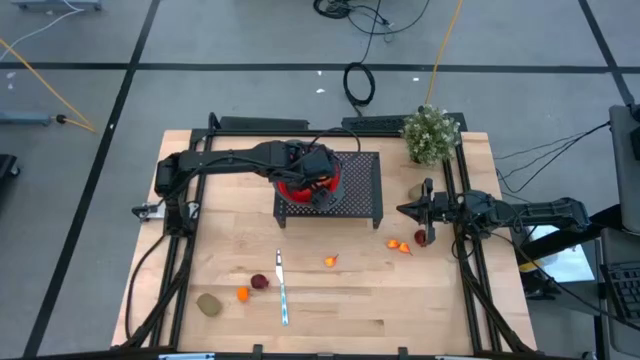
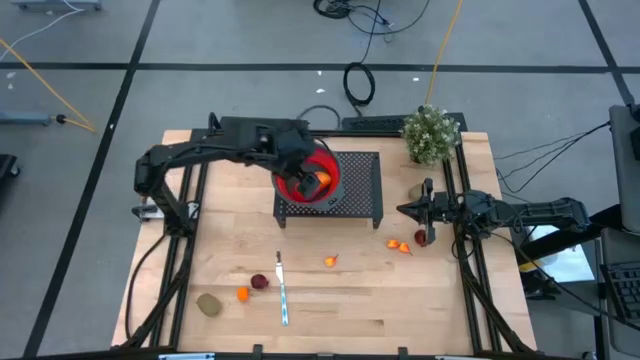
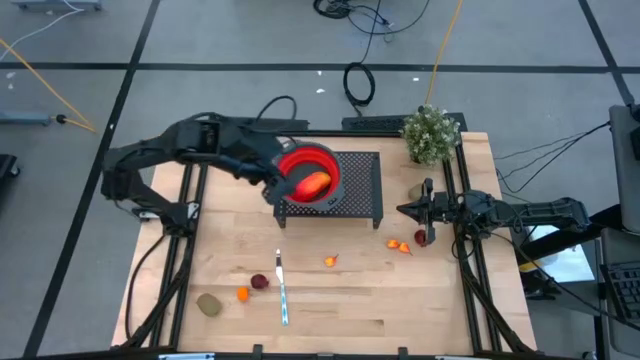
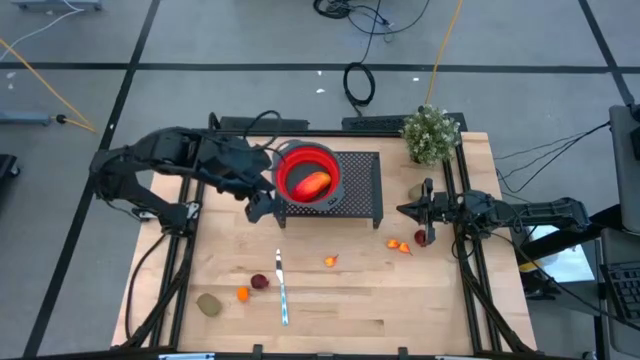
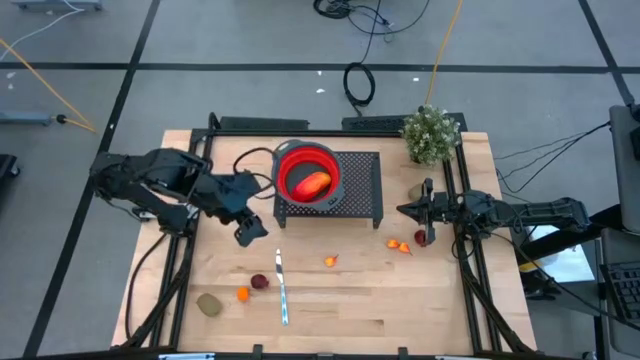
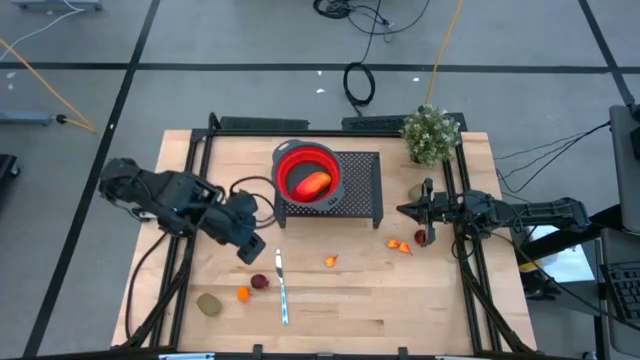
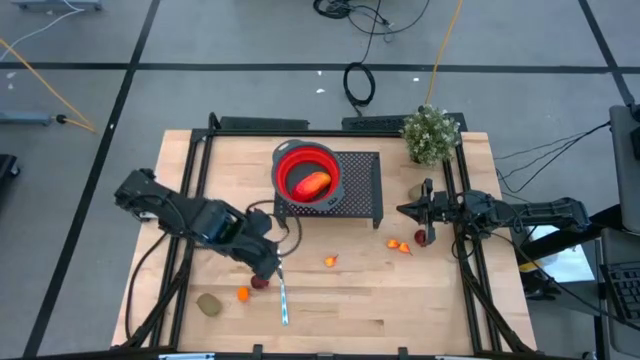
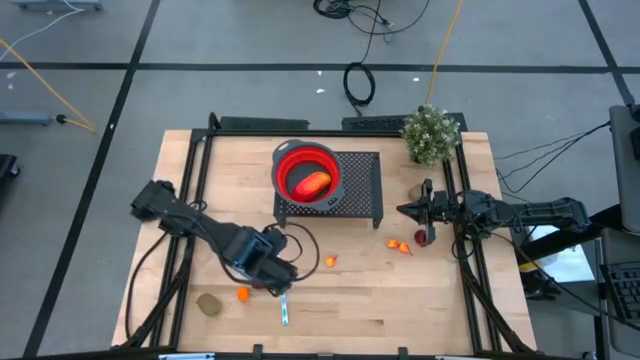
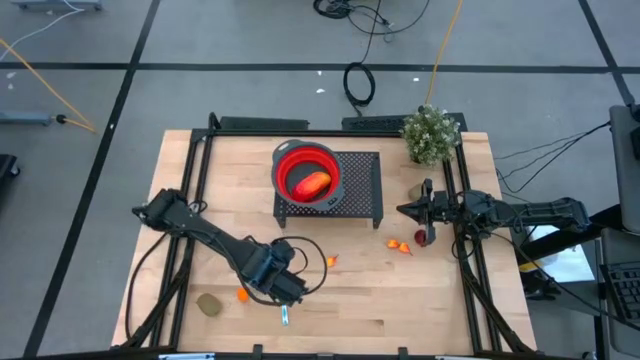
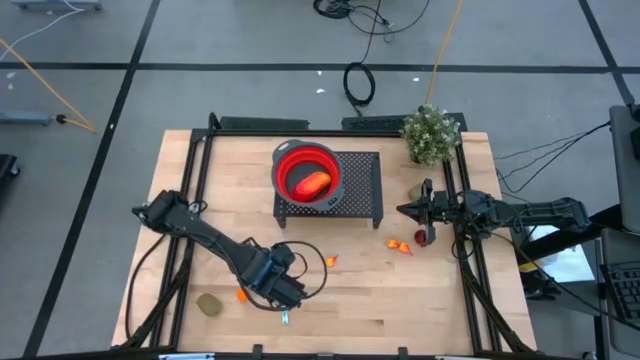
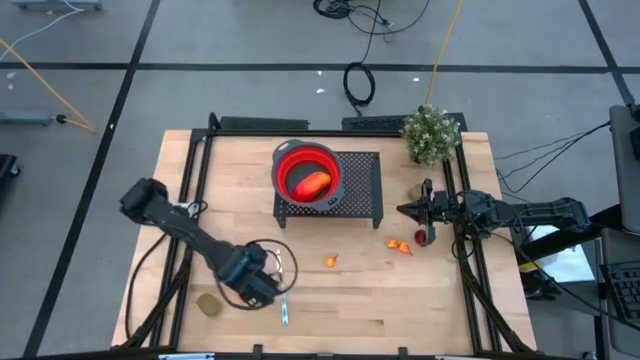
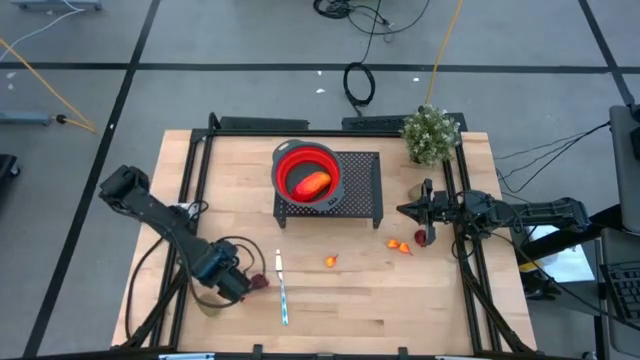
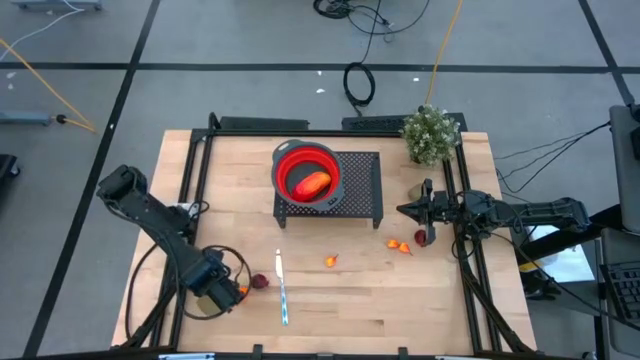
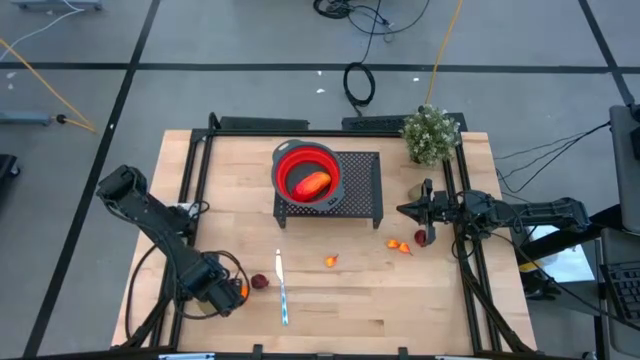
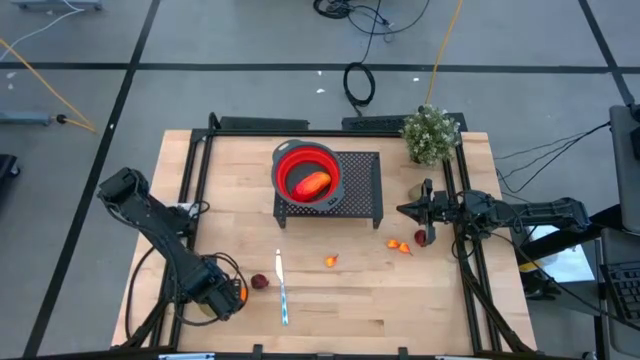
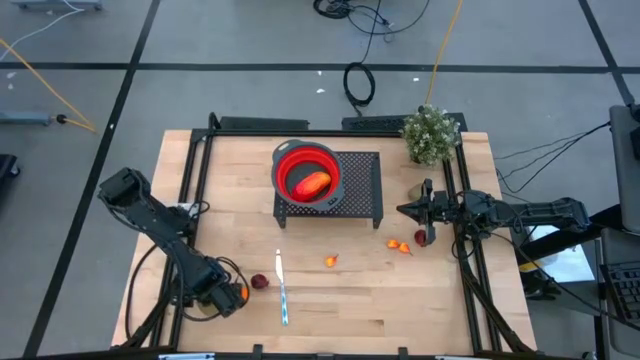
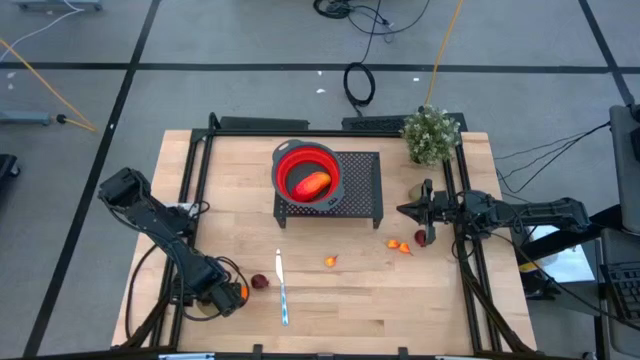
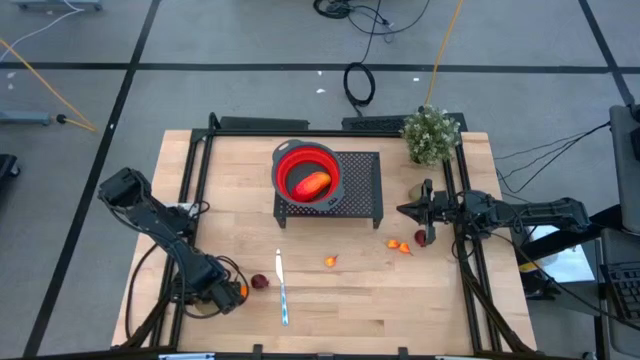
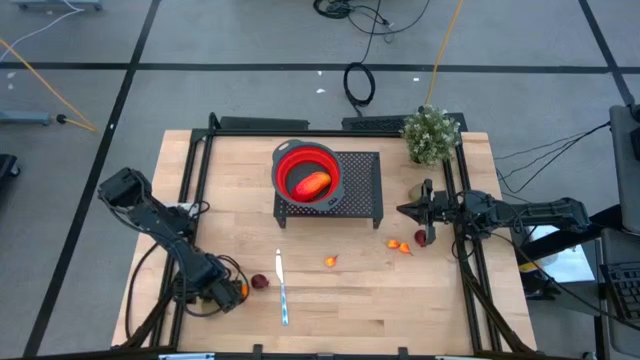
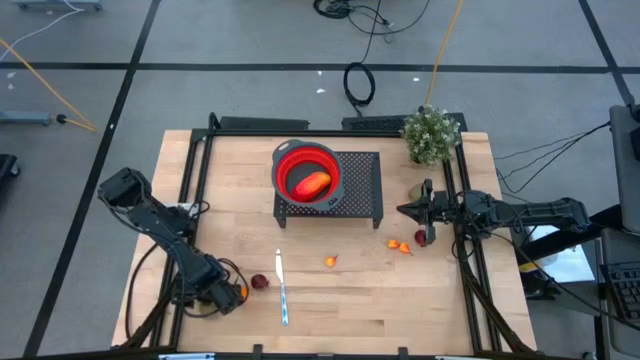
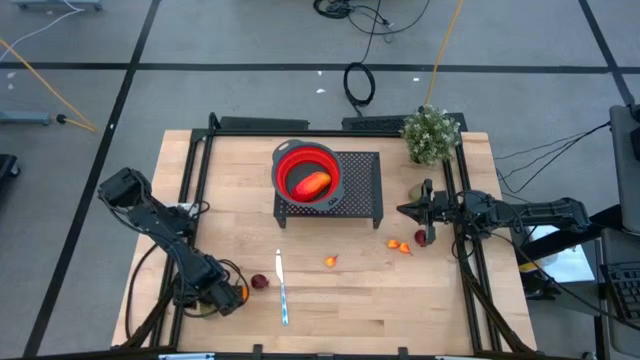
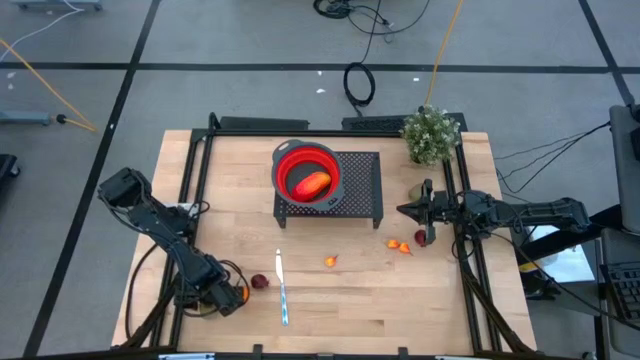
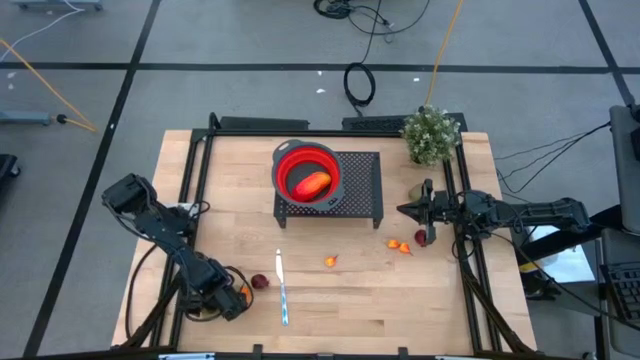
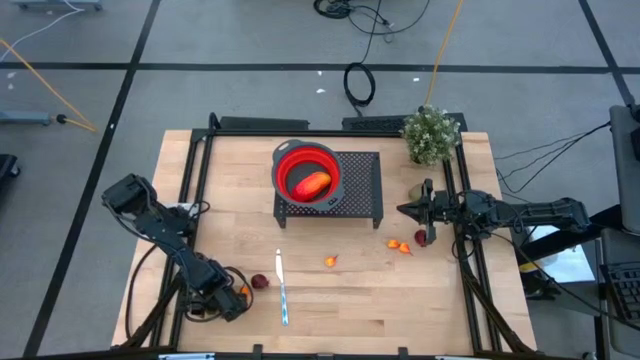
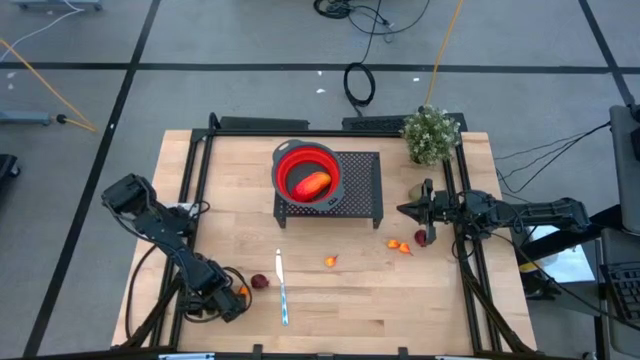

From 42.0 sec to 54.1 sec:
Task: Pick & Place Fruit
Put the bottom left kiwi into the strainer on the shelf

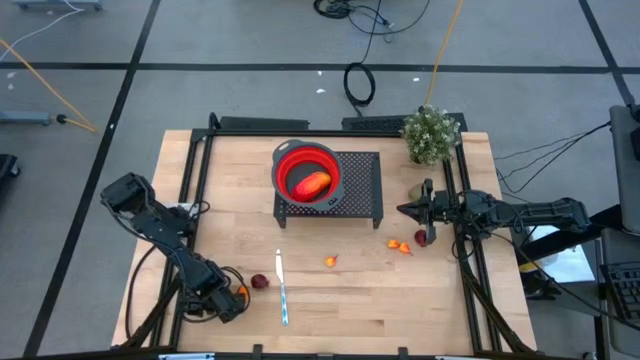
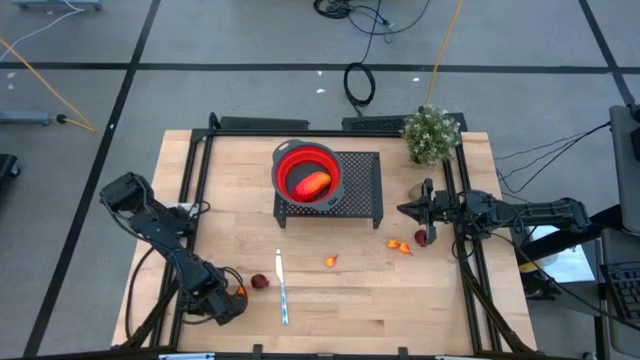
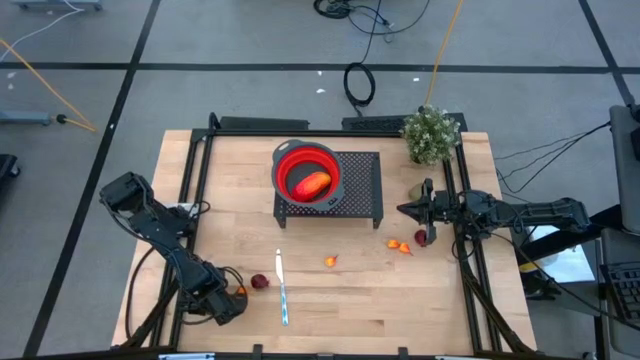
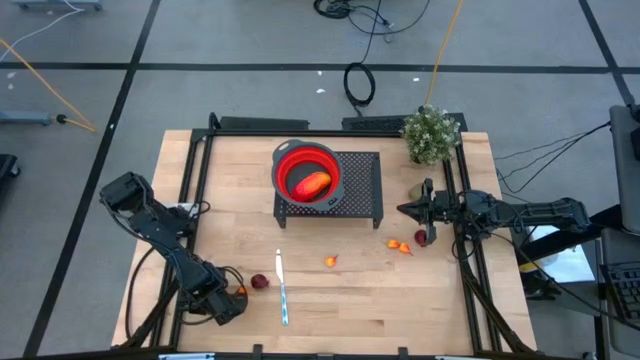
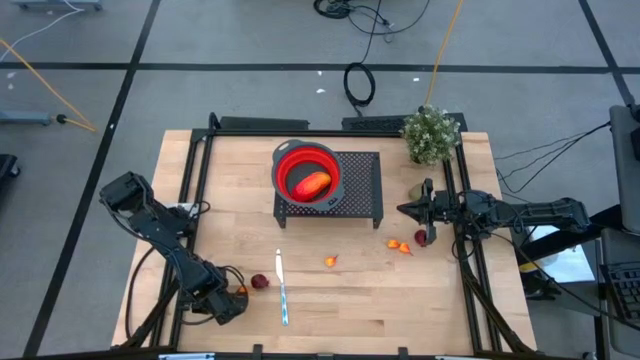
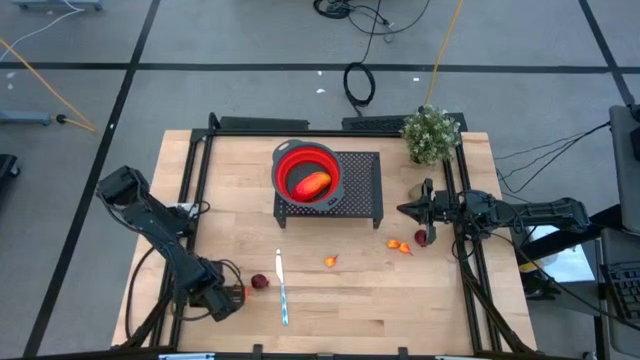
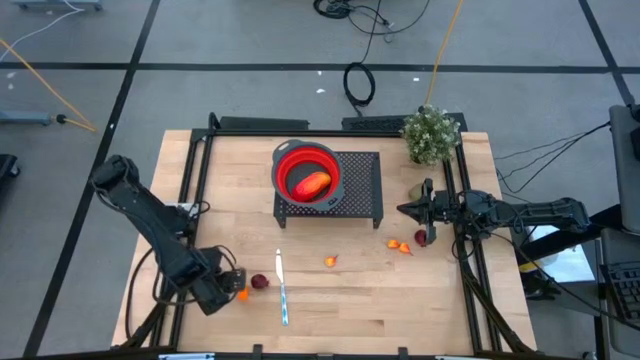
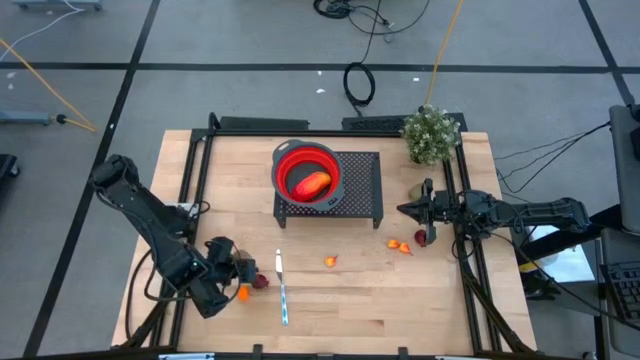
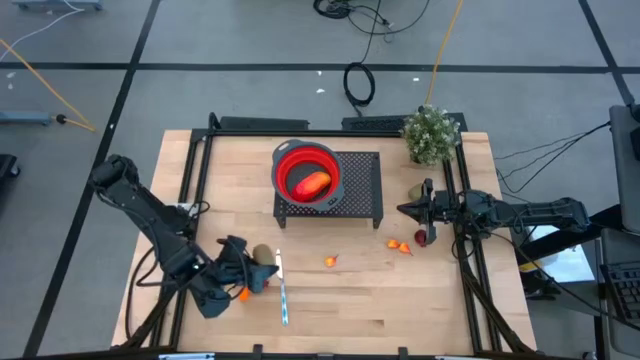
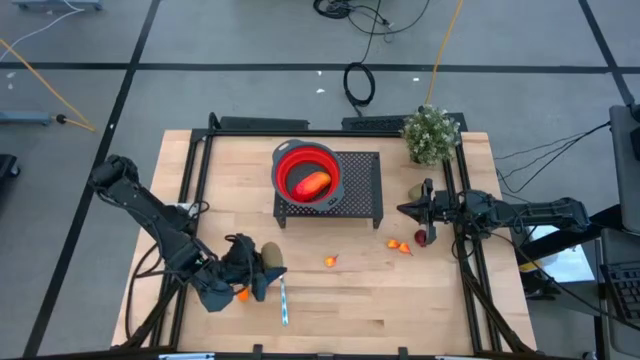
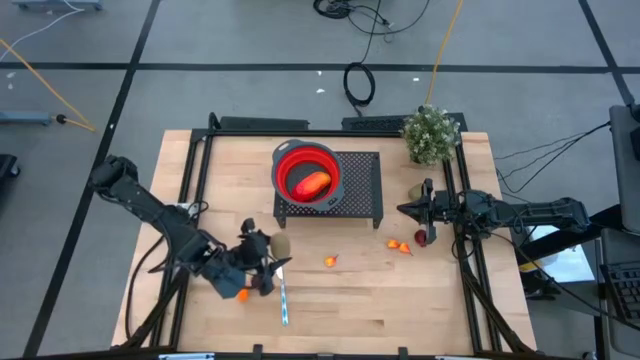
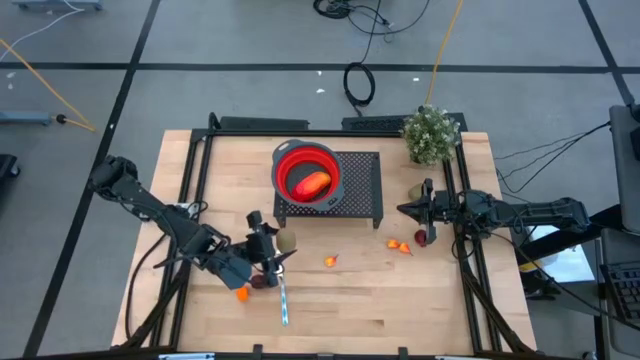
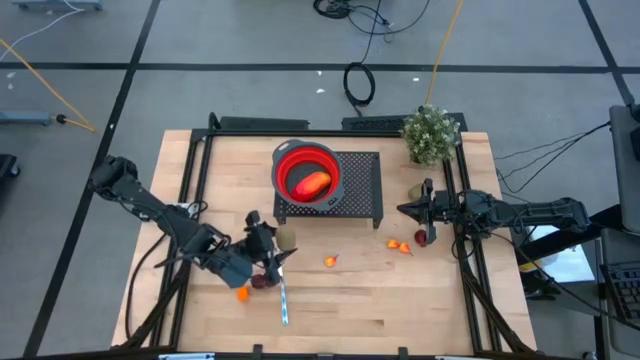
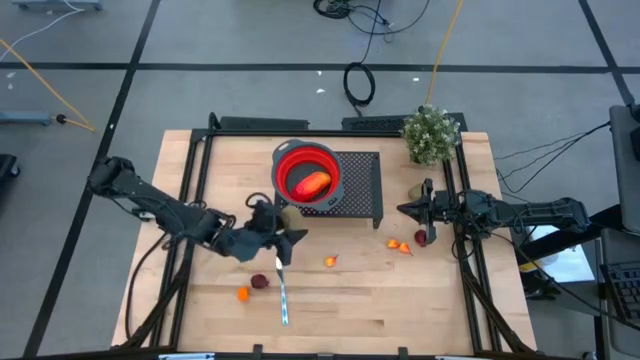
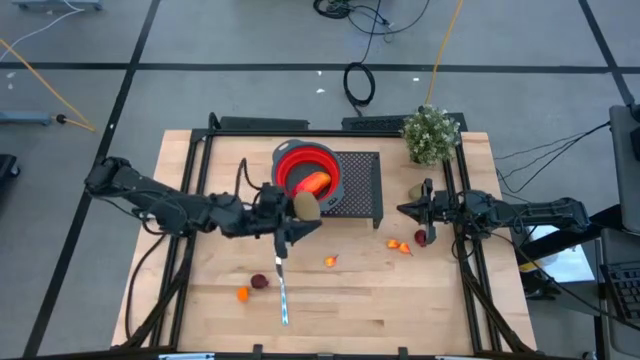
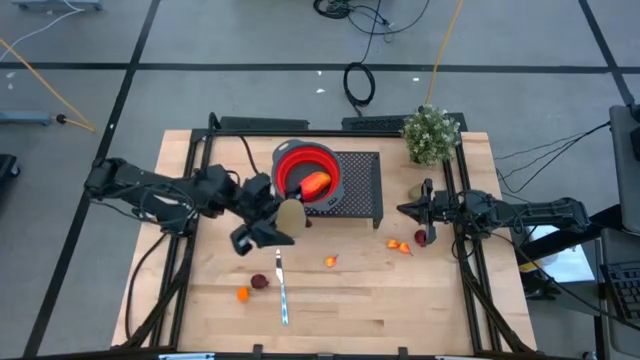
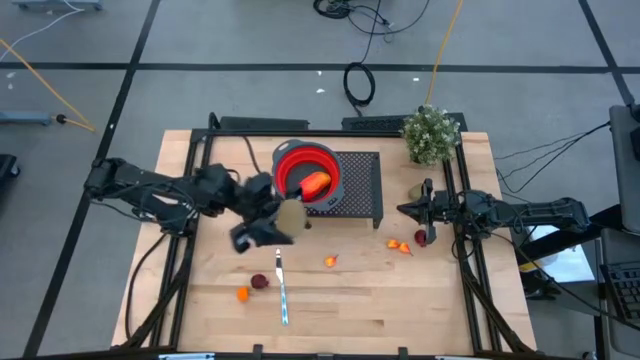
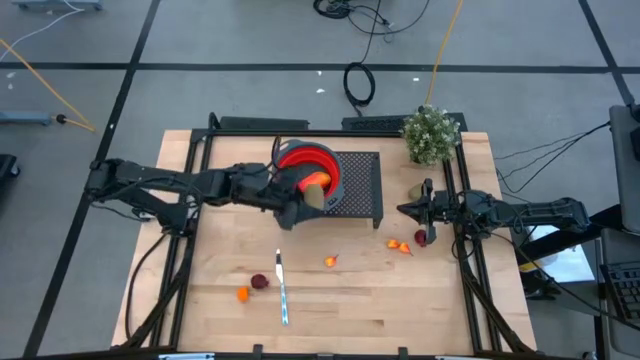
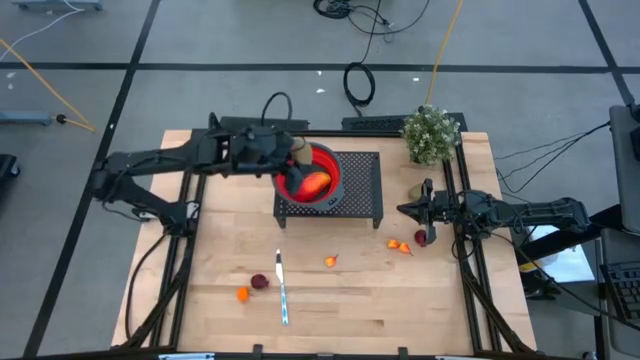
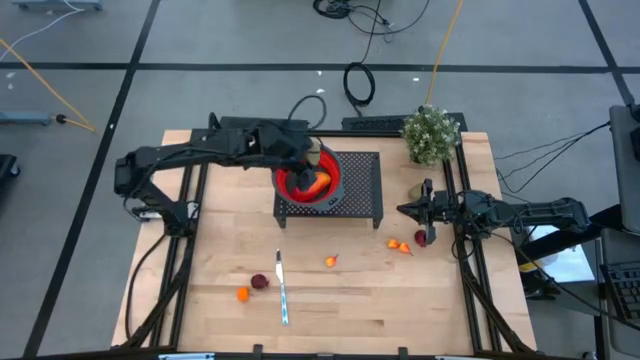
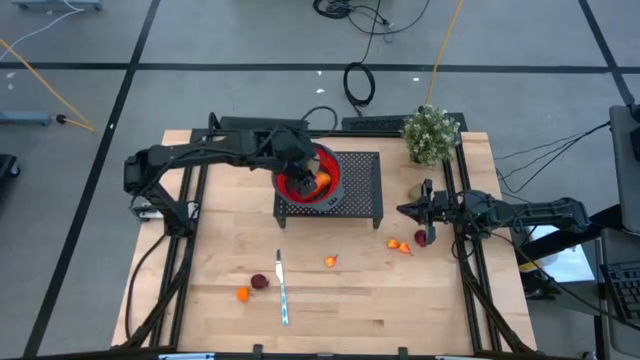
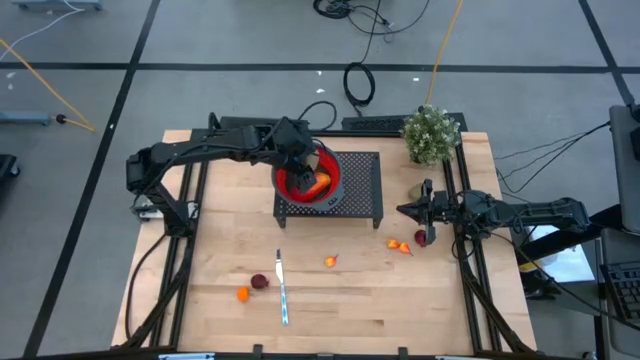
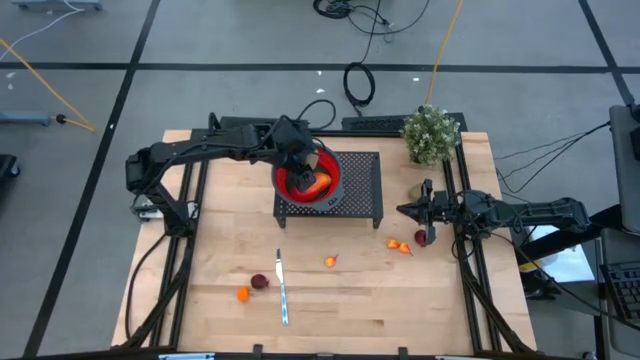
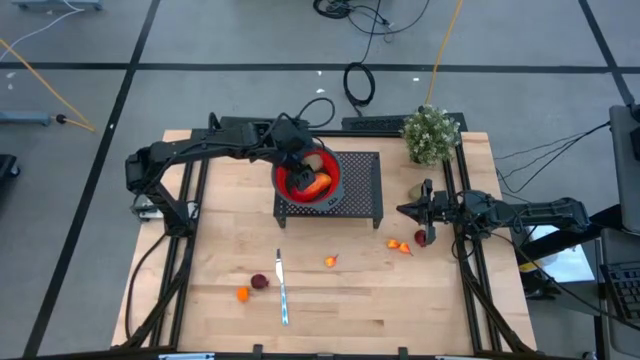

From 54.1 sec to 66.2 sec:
Put the bottom left kiwi into the strainer on the shelf
